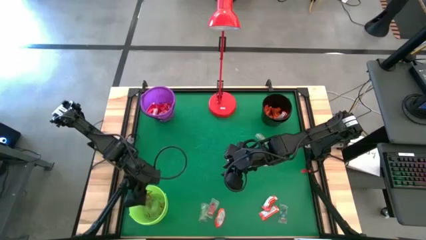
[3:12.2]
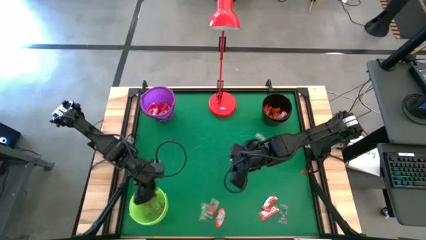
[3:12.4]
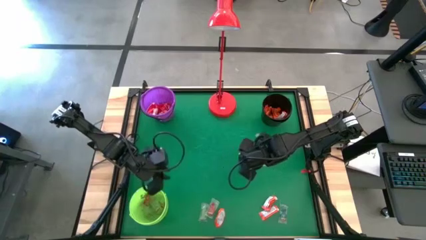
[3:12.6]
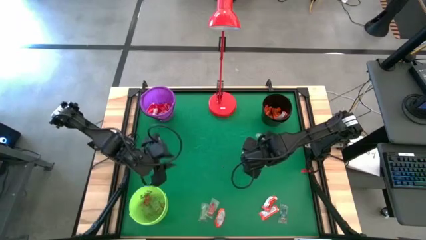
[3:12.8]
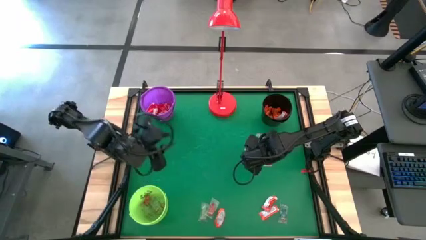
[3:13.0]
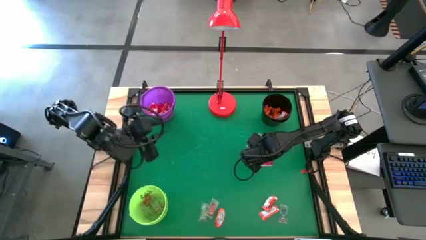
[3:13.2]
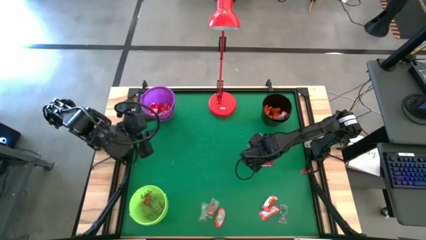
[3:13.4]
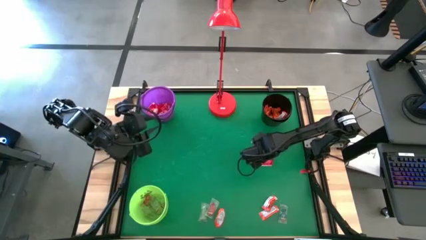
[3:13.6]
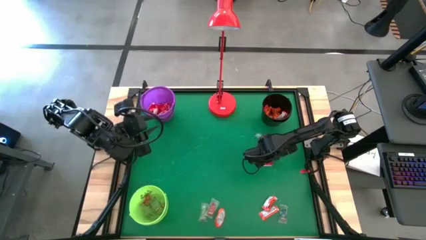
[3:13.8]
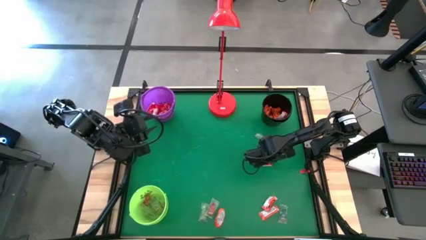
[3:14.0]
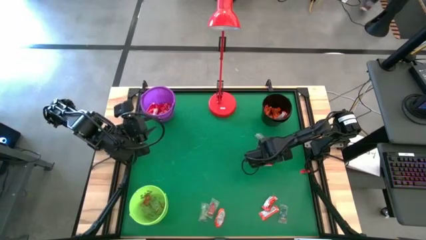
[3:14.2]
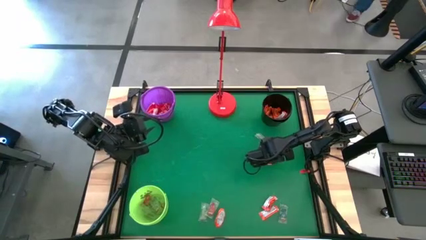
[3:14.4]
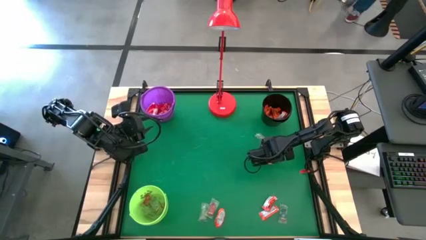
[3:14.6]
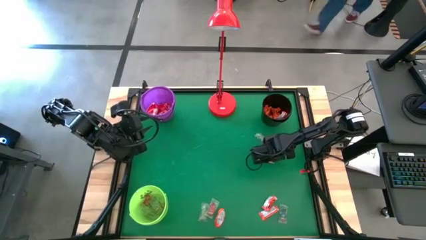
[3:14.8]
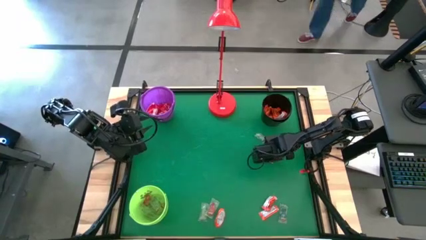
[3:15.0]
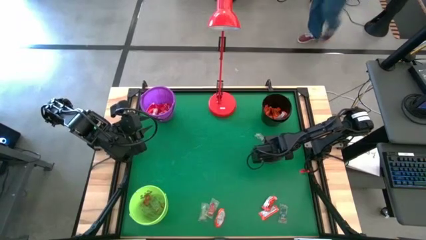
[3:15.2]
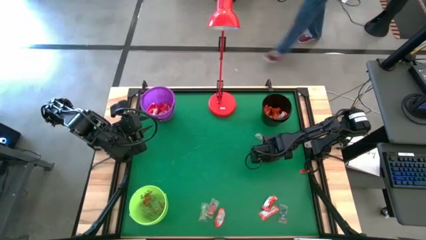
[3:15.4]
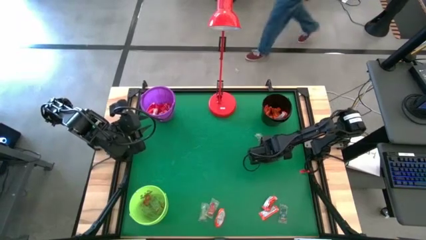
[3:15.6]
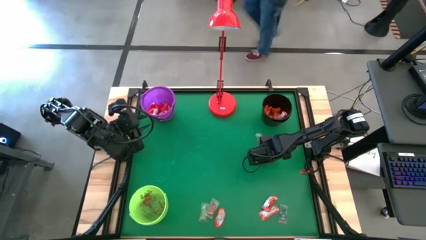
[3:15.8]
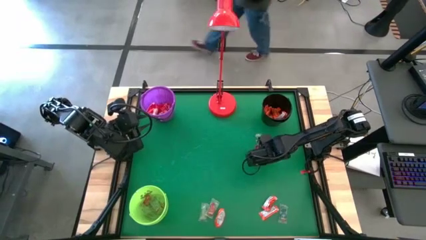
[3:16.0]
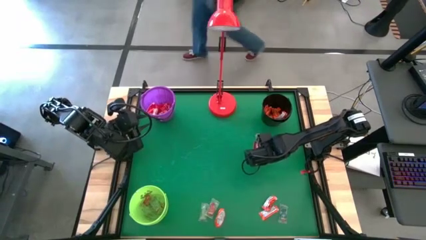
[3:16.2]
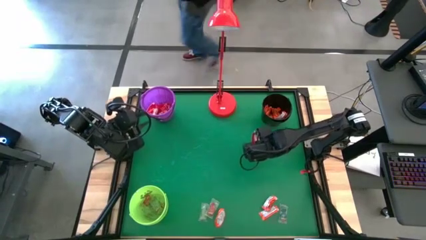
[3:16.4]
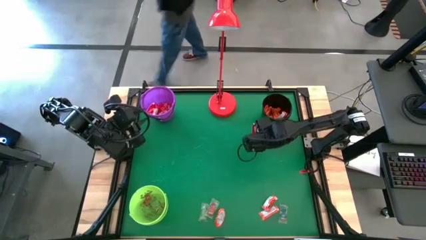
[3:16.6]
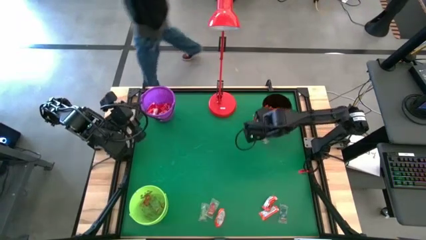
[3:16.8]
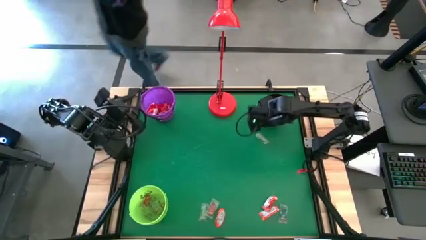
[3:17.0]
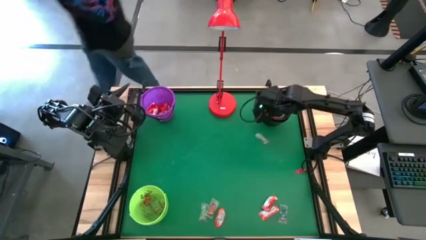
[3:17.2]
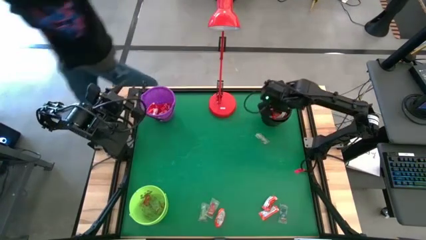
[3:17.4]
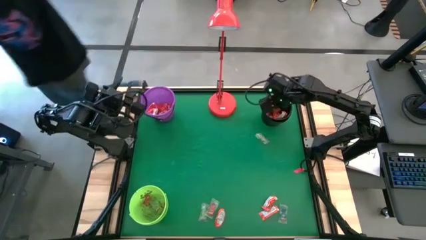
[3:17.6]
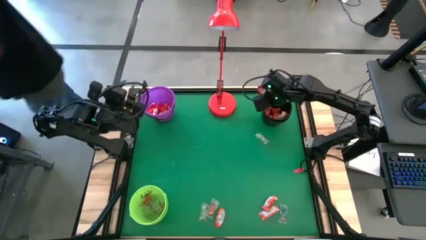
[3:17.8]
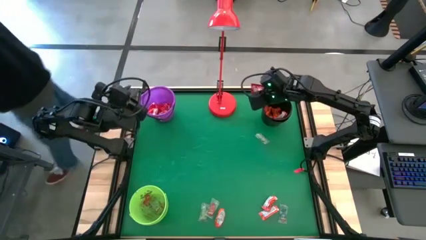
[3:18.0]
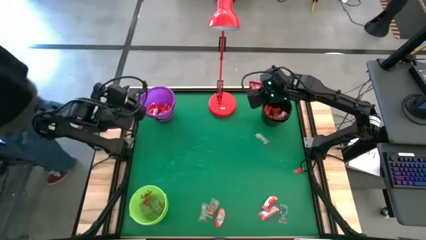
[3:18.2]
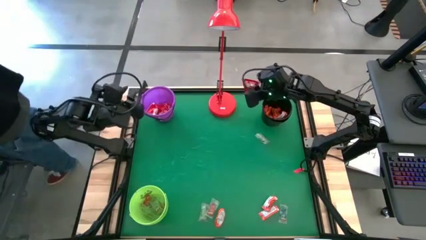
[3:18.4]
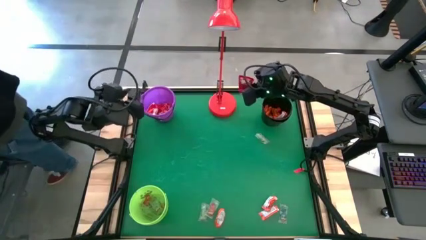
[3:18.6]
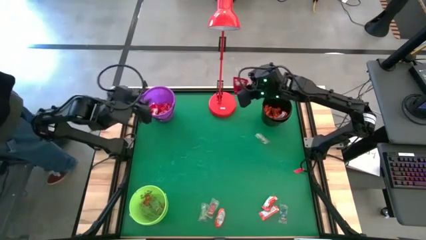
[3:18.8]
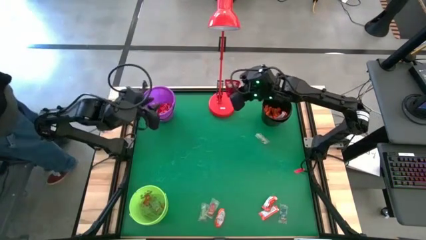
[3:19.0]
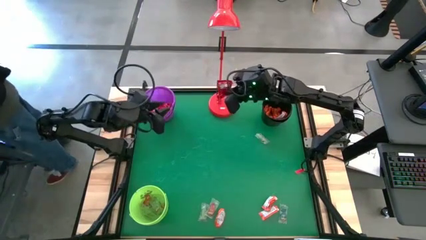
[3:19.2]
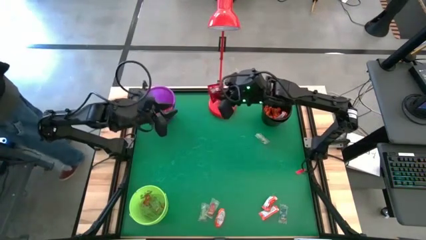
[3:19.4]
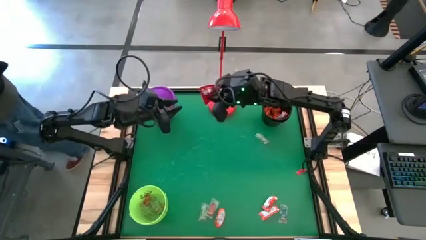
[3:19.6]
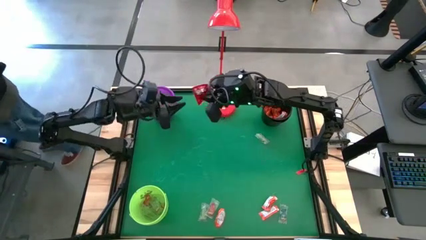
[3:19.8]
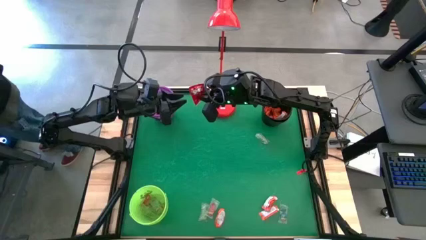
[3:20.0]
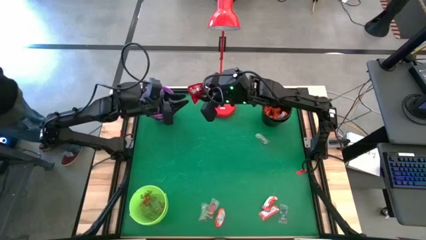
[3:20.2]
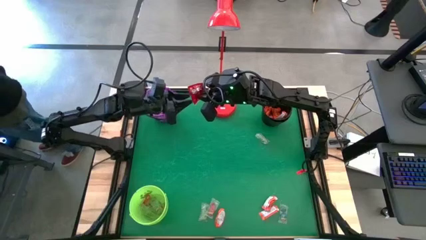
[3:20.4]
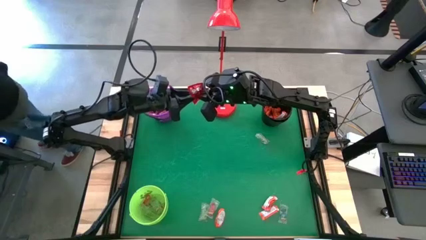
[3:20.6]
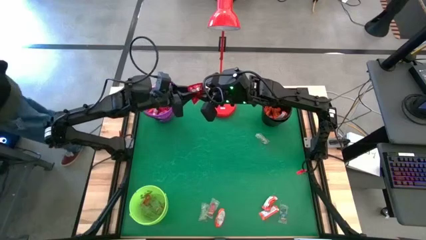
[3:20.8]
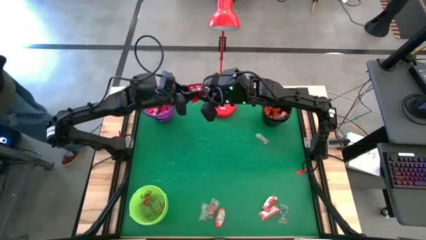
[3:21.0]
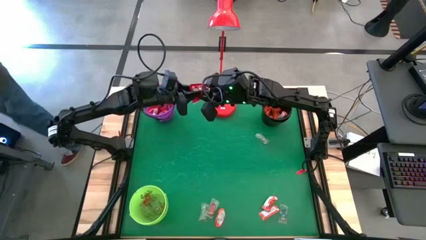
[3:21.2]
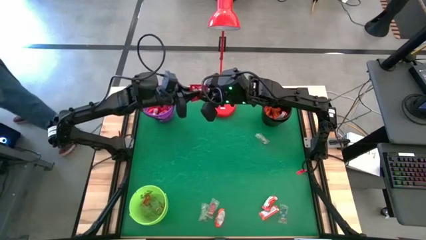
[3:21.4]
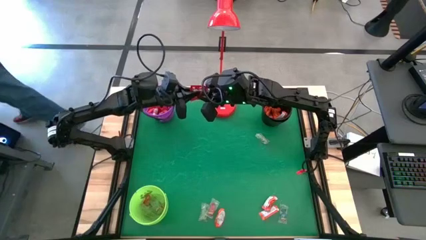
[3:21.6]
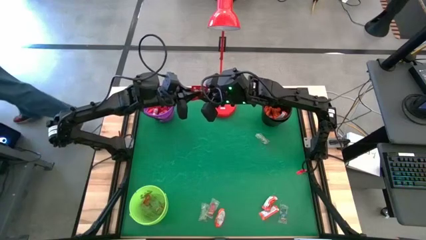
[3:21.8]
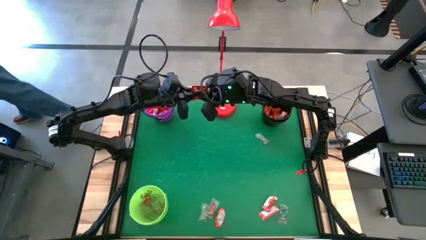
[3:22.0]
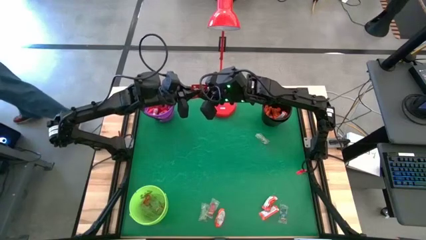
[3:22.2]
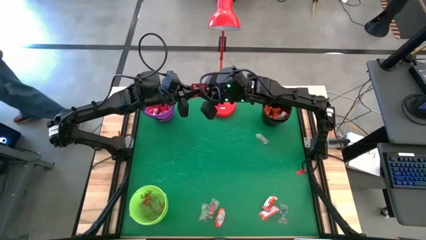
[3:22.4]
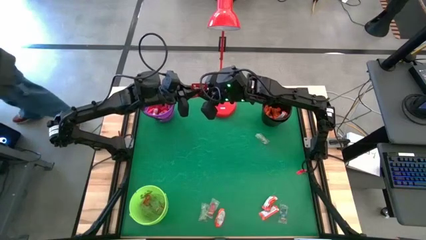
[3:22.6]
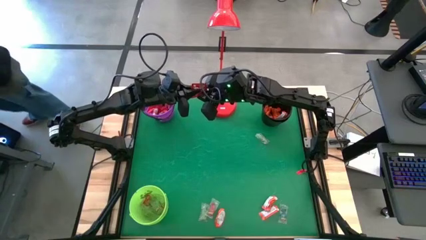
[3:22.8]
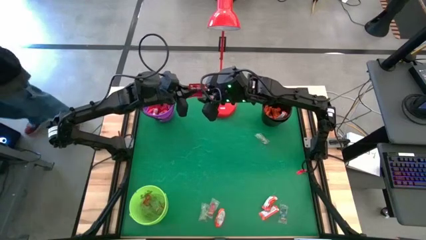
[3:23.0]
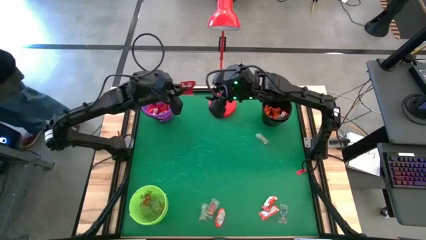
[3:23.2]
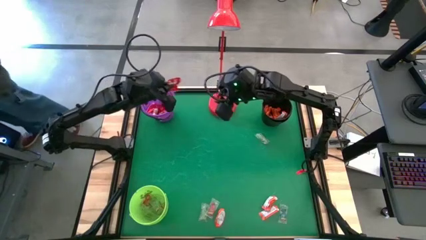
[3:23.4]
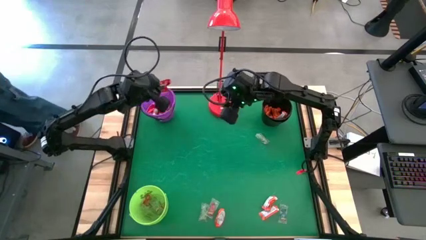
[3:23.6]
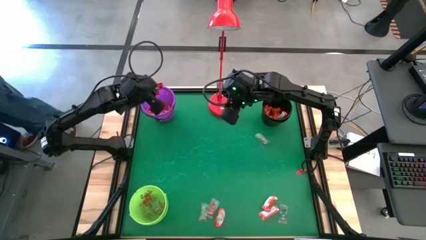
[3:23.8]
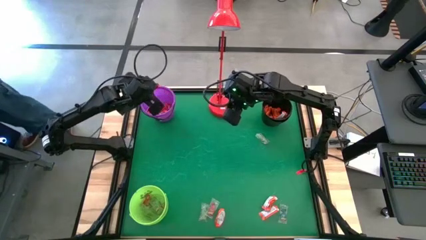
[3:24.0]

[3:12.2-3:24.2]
Task: Sort candy
Put the red candy into the violet bucket

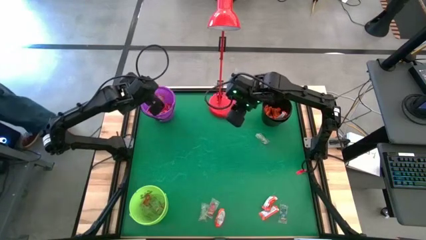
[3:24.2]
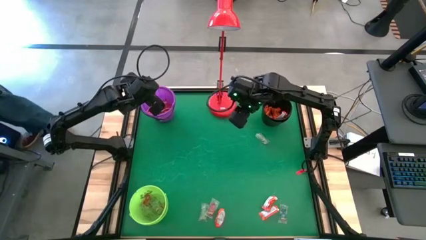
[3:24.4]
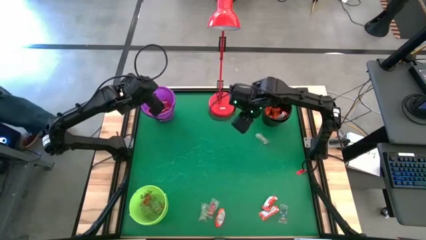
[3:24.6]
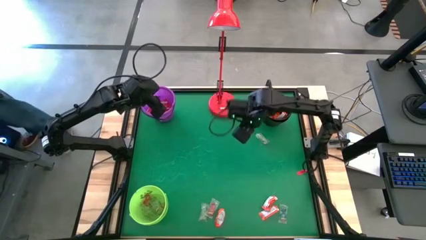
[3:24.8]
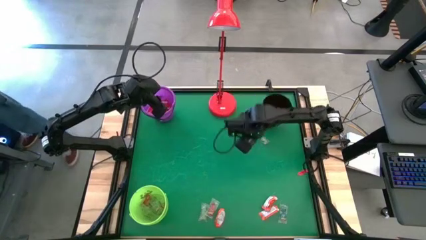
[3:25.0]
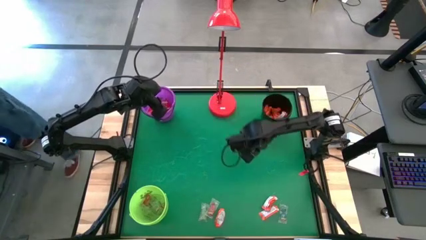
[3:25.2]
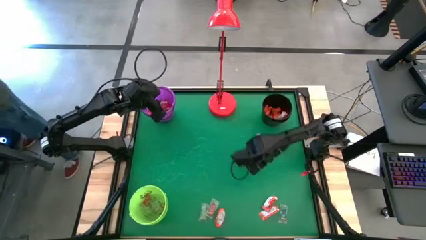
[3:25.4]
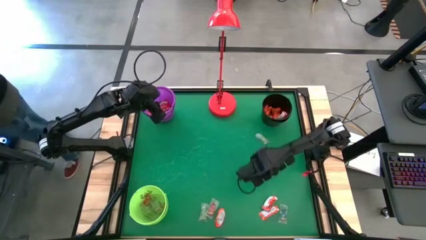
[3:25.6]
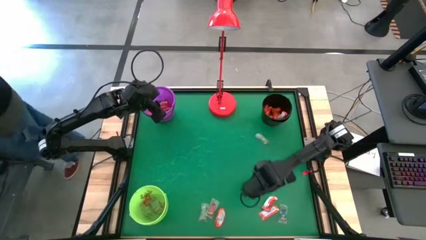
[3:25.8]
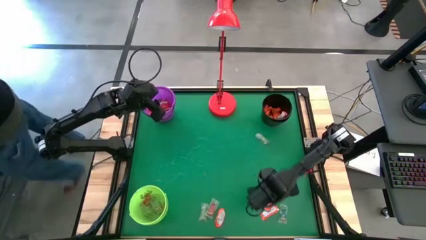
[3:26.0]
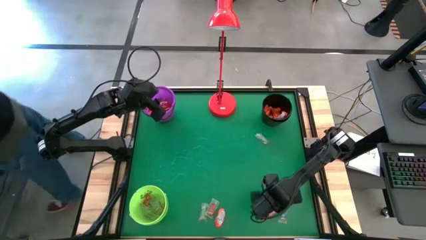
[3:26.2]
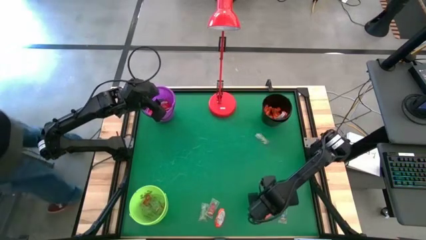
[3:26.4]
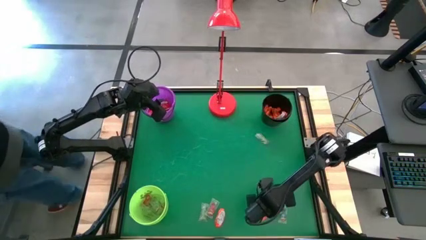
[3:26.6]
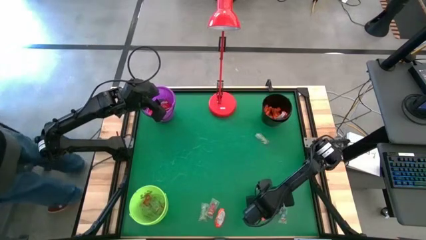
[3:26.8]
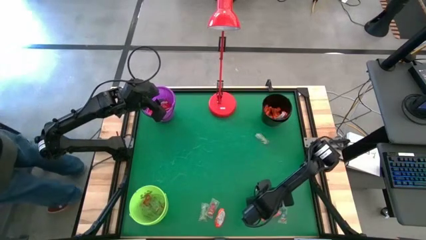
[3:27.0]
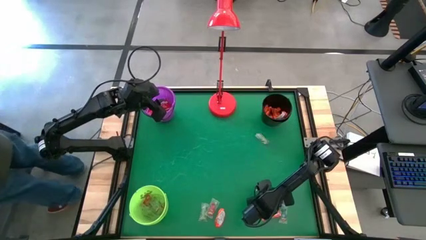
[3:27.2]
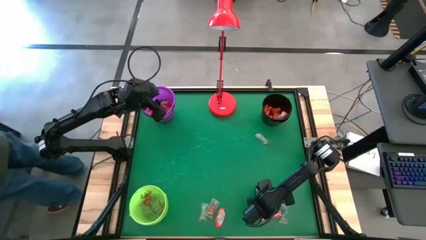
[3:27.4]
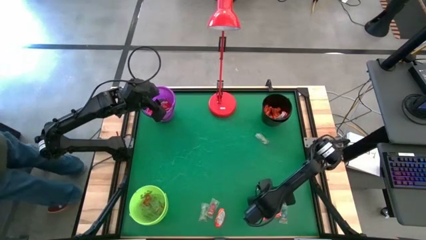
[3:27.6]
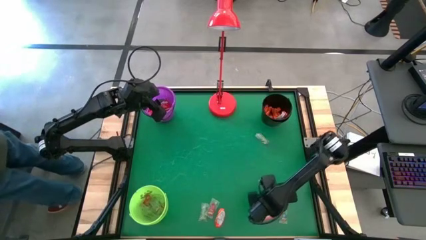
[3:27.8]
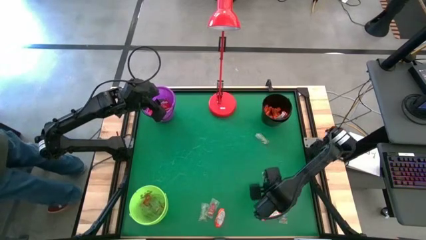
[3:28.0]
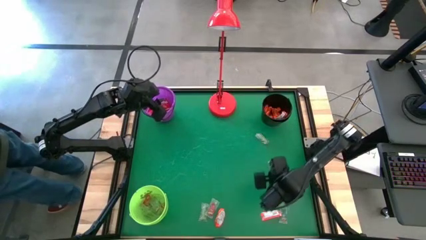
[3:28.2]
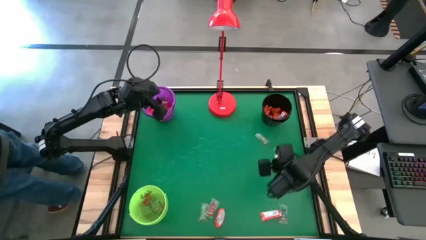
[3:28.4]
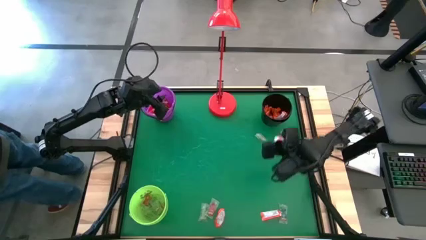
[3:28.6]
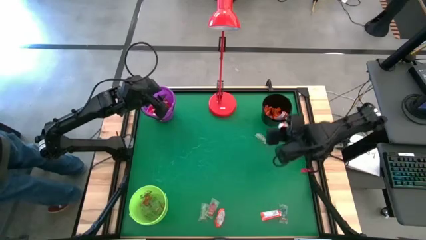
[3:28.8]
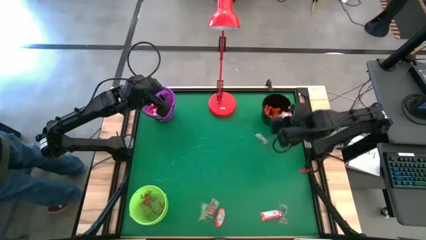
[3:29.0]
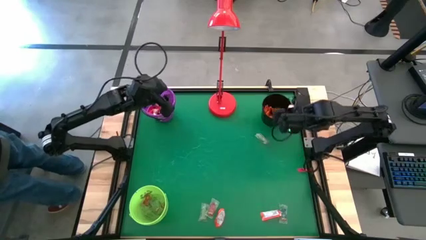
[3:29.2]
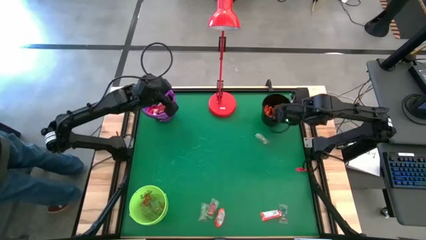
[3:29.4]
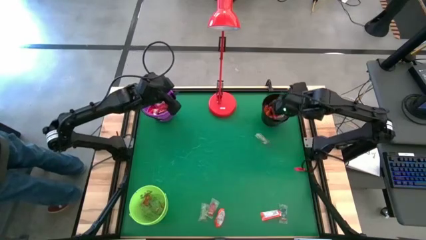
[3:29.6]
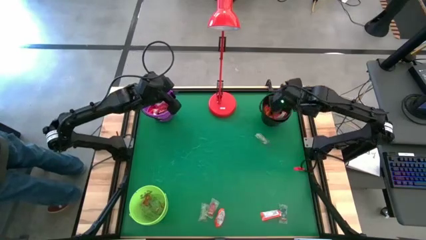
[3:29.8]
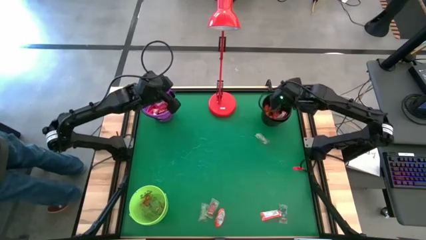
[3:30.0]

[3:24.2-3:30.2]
Put the orange chocolate into the black bucket
